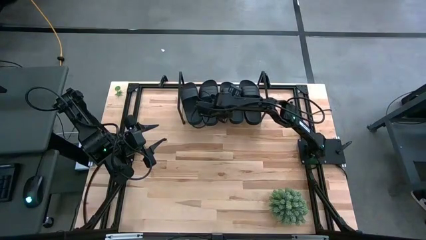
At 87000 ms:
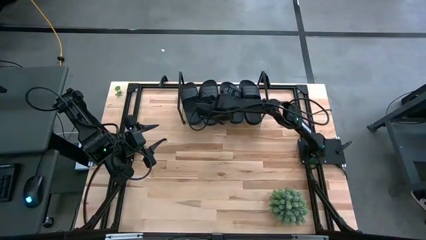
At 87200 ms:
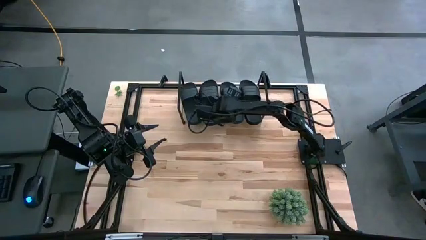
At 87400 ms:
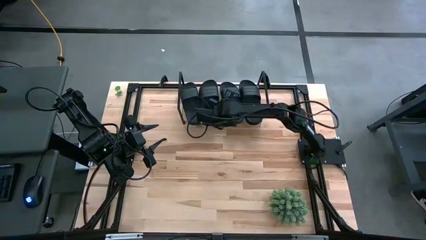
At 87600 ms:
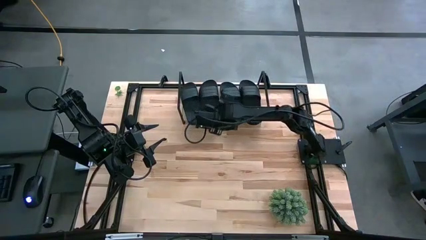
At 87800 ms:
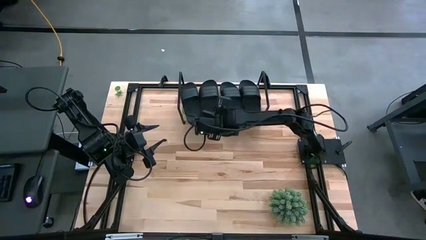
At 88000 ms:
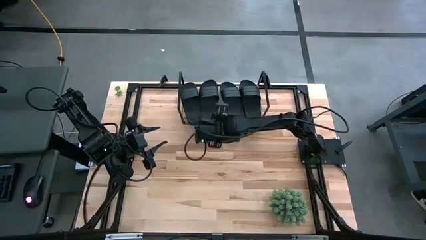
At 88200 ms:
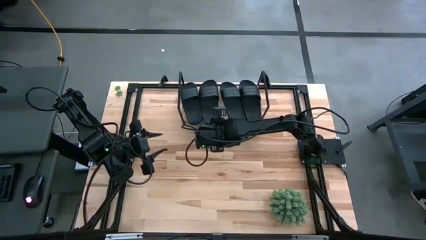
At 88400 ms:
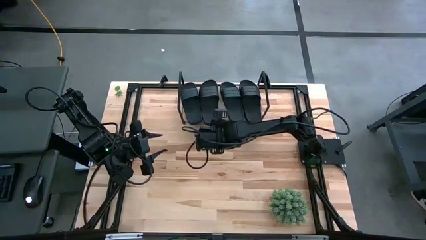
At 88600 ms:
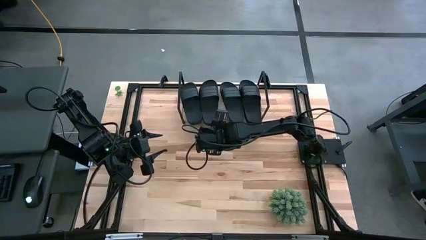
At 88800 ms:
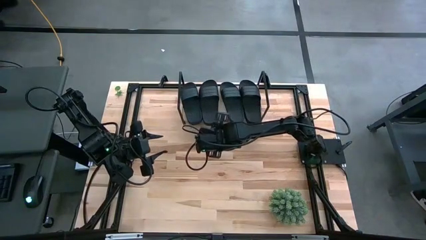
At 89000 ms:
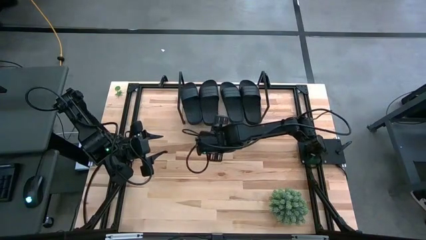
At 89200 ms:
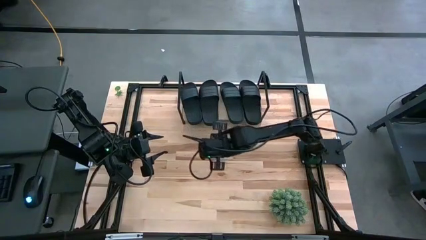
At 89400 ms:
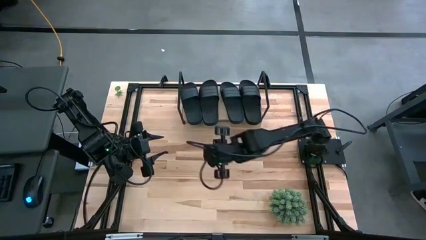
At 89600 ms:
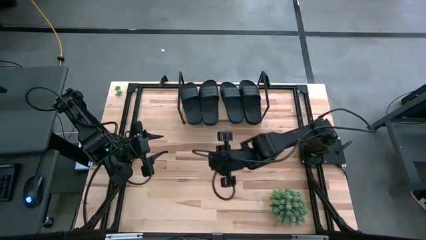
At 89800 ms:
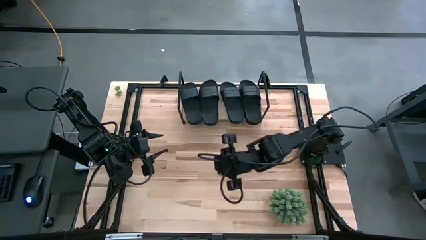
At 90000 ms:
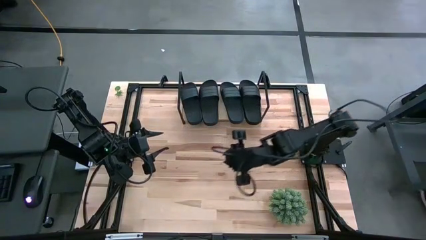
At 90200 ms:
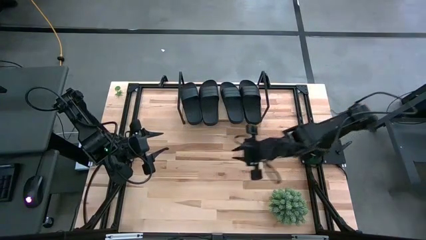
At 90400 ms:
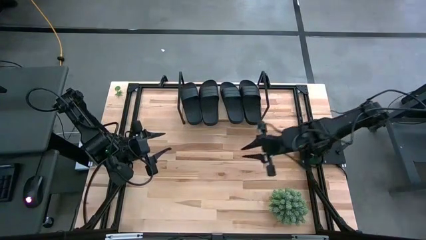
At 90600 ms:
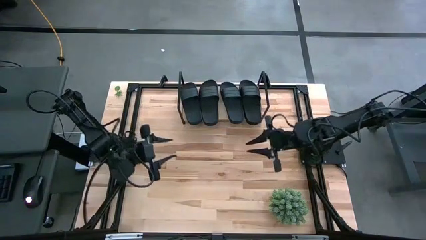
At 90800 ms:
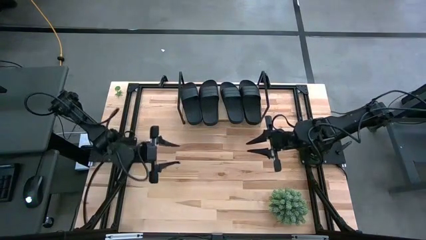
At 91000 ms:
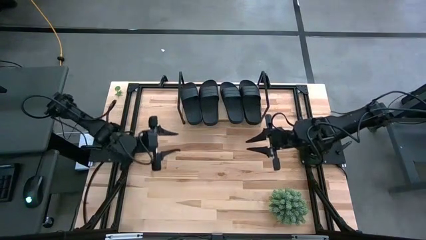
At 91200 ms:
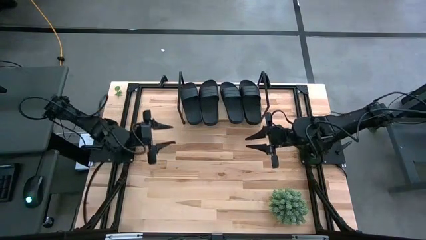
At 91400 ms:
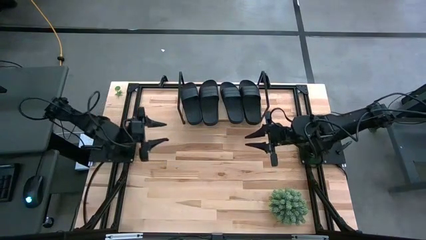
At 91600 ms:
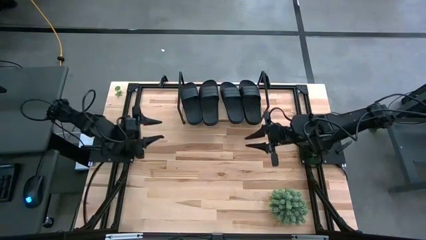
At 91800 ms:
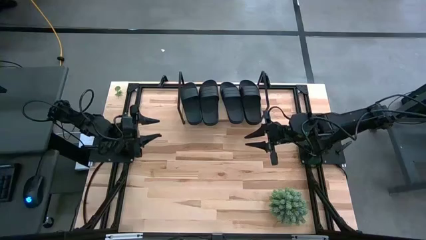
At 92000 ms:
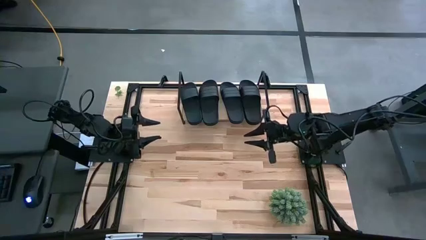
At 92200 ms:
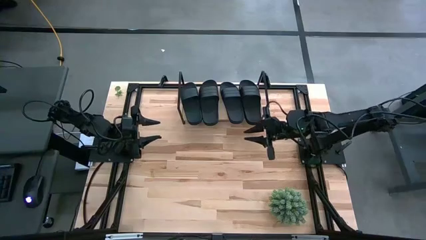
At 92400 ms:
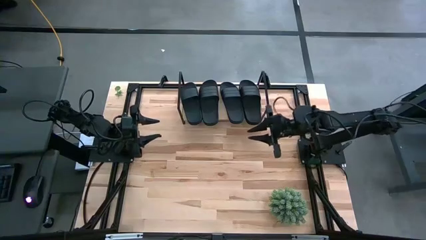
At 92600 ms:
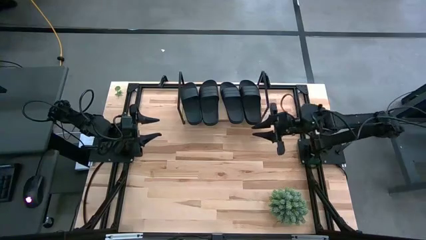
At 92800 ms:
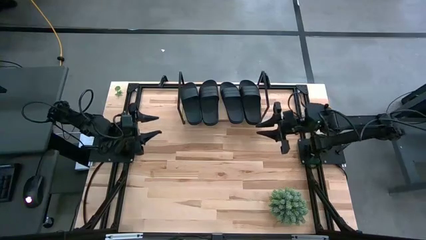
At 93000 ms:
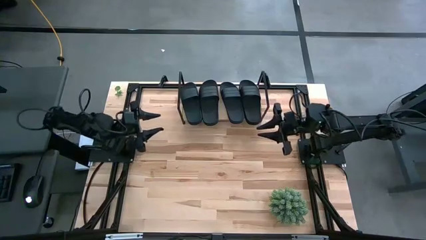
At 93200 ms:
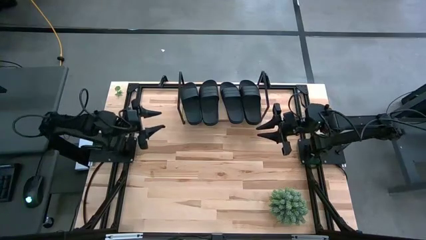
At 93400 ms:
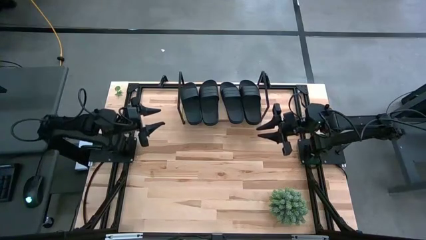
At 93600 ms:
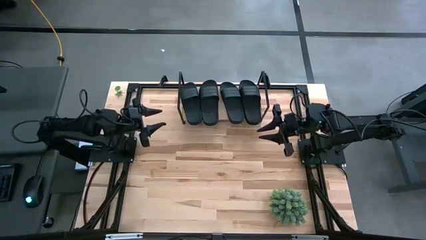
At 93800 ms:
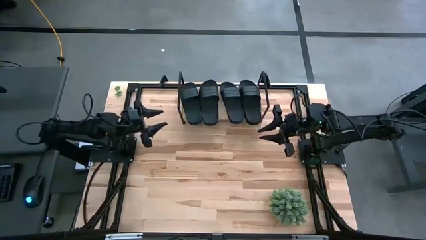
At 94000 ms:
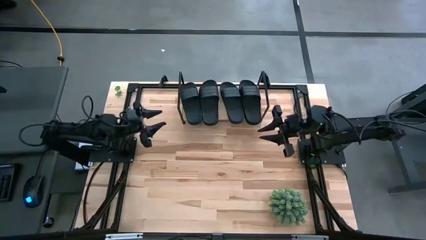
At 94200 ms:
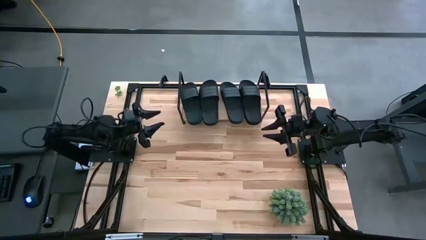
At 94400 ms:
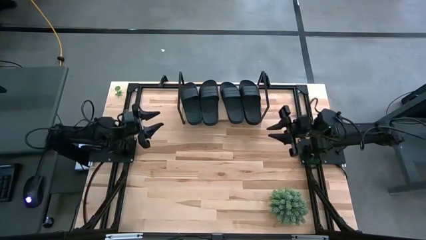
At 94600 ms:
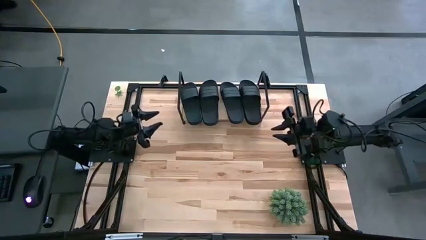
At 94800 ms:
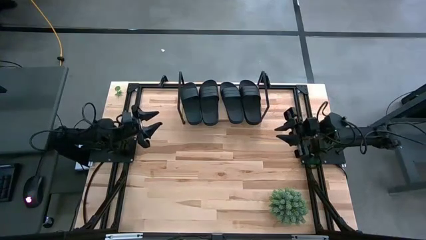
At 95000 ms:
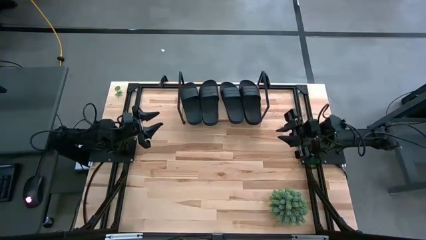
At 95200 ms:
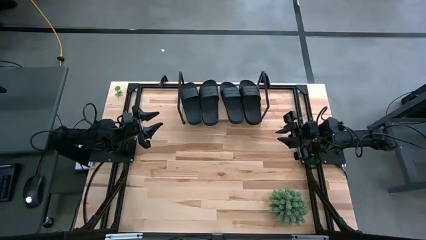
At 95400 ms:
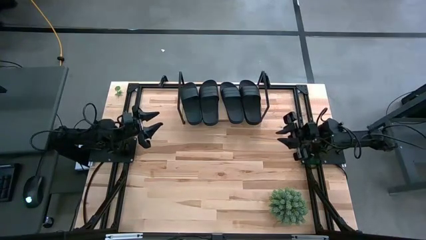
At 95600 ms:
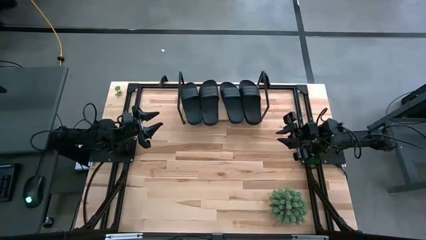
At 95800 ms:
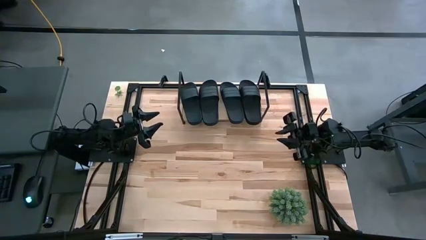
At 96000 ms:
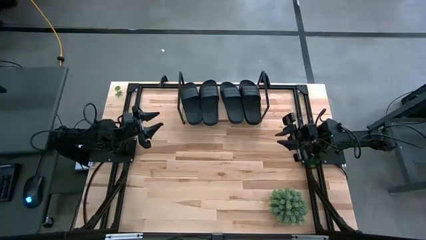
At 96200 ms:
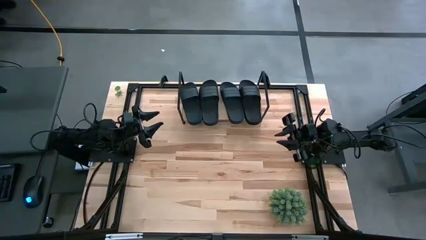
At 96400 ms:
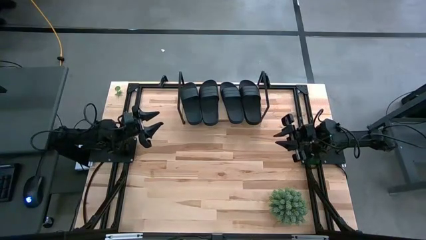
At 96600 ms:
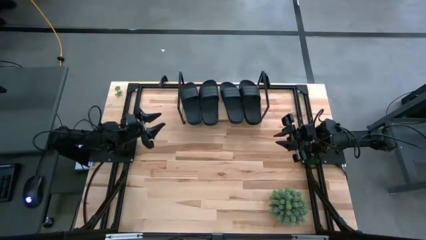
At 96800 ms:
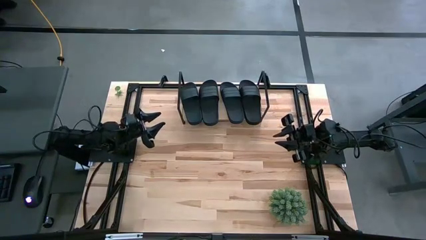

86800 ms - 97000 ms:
Task: Pick and place slides into the shelf
Return to Home Position
